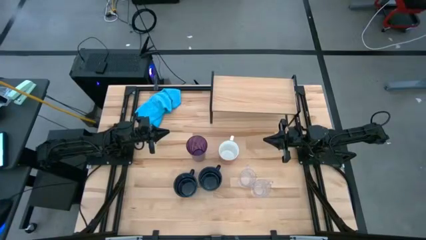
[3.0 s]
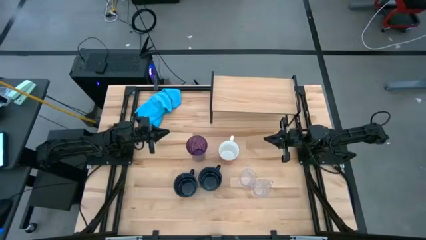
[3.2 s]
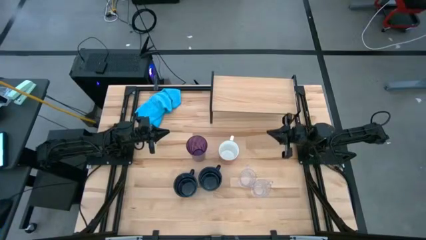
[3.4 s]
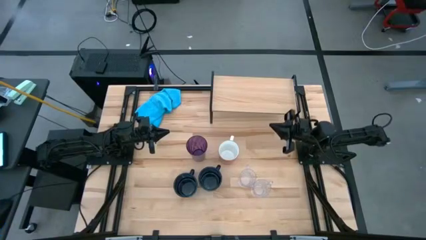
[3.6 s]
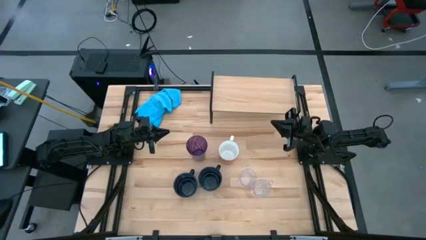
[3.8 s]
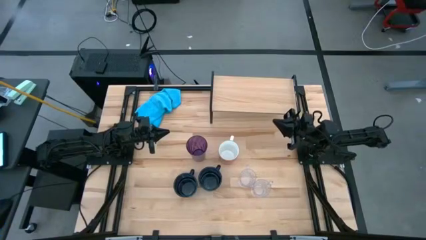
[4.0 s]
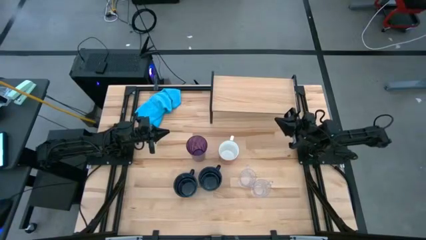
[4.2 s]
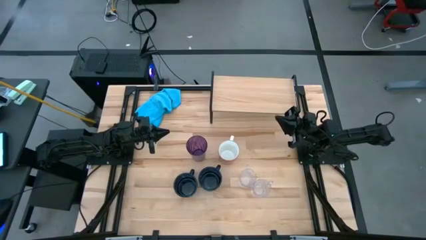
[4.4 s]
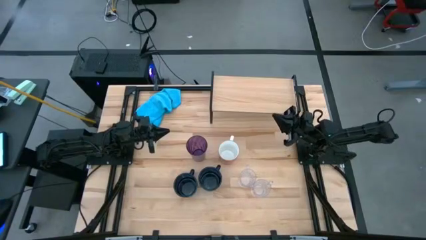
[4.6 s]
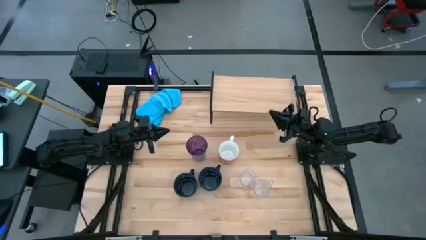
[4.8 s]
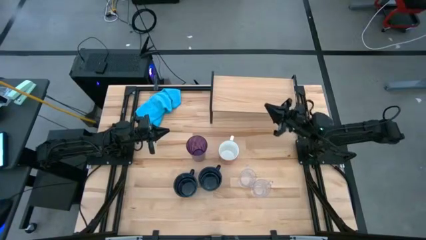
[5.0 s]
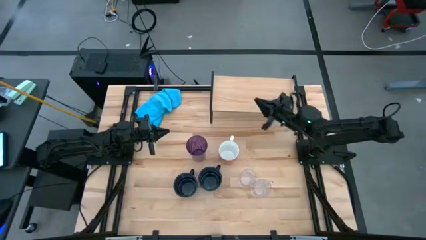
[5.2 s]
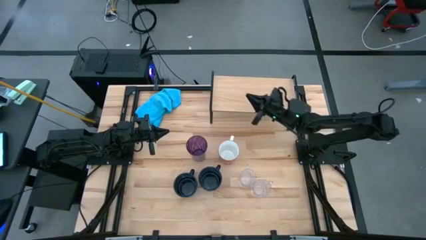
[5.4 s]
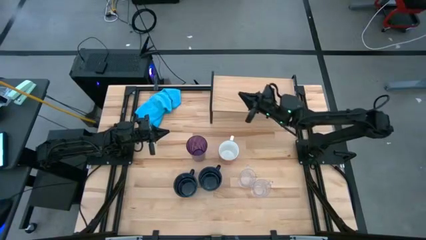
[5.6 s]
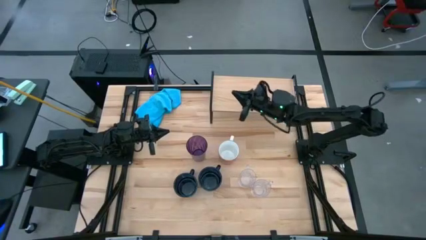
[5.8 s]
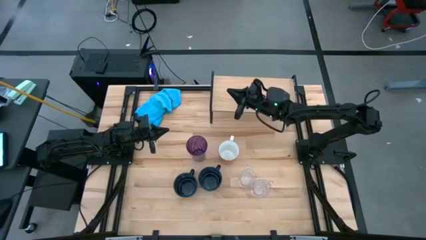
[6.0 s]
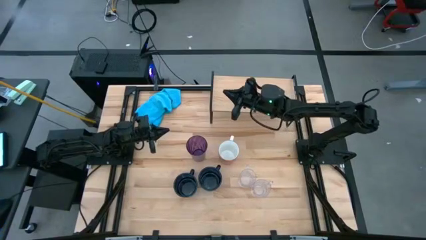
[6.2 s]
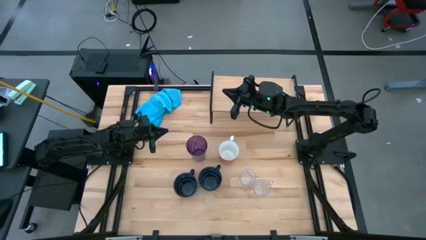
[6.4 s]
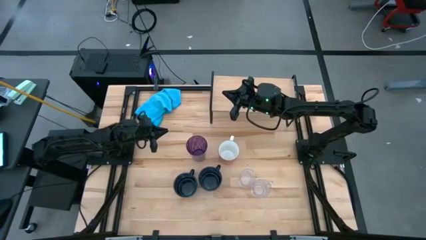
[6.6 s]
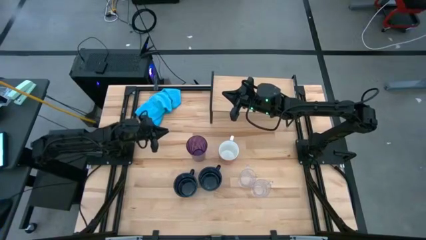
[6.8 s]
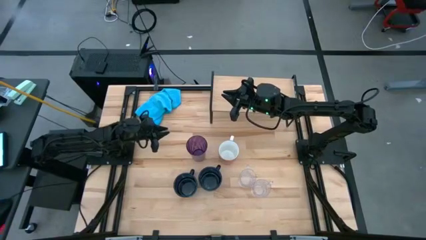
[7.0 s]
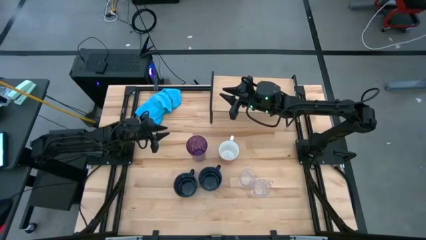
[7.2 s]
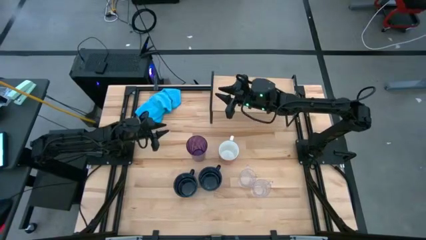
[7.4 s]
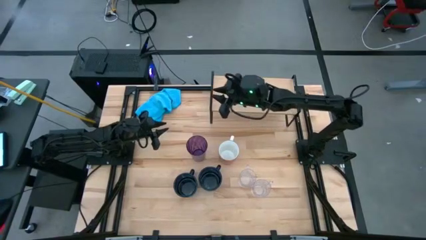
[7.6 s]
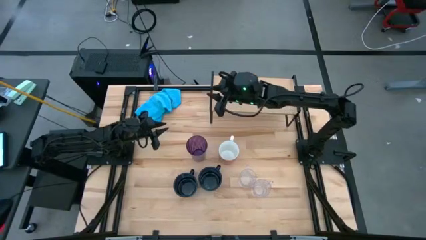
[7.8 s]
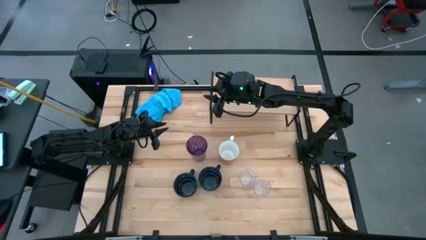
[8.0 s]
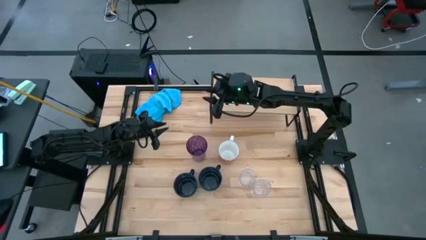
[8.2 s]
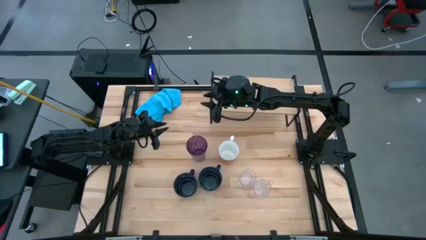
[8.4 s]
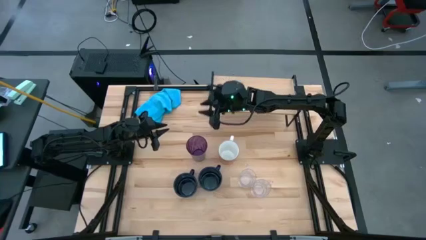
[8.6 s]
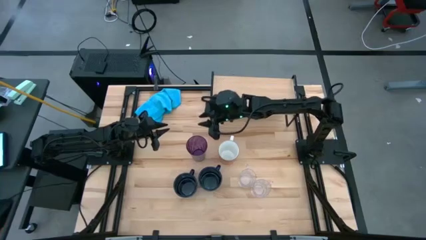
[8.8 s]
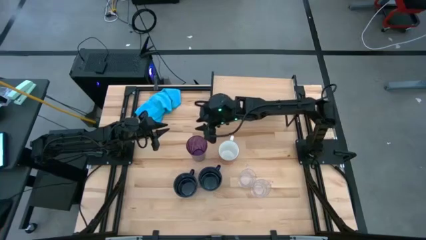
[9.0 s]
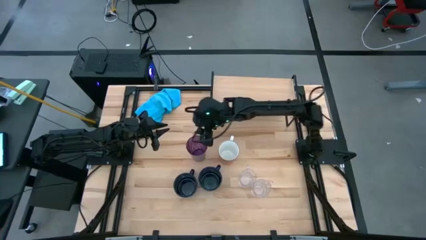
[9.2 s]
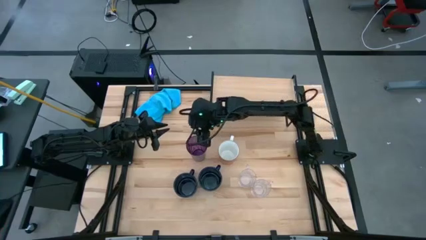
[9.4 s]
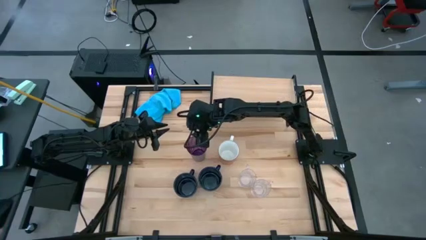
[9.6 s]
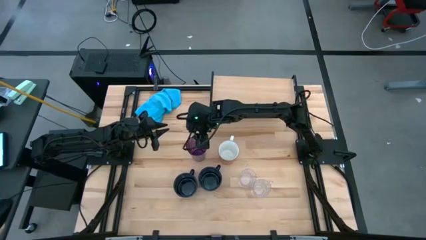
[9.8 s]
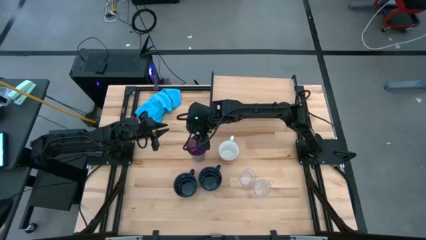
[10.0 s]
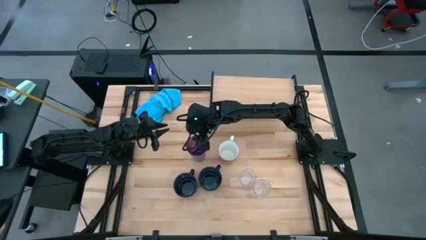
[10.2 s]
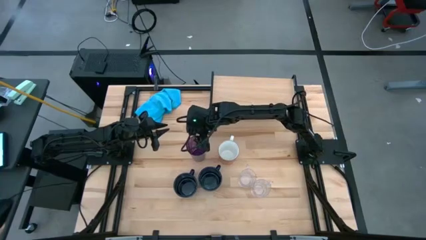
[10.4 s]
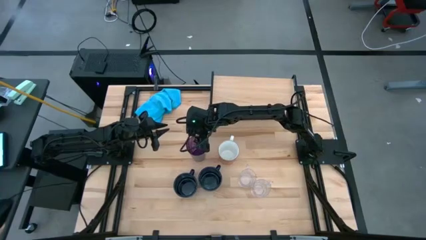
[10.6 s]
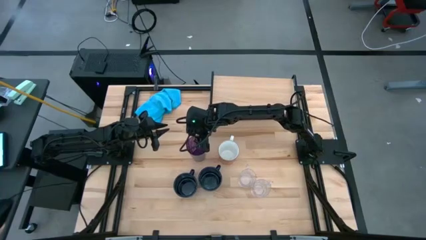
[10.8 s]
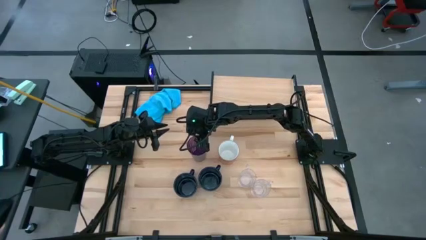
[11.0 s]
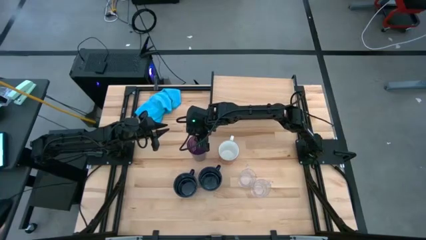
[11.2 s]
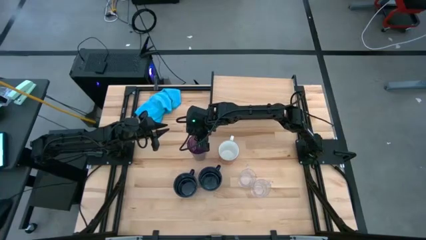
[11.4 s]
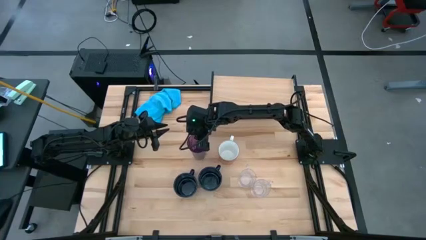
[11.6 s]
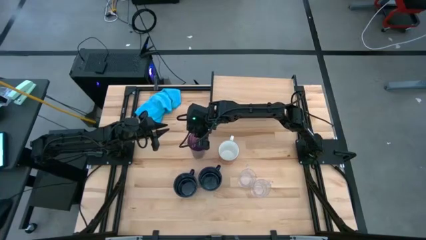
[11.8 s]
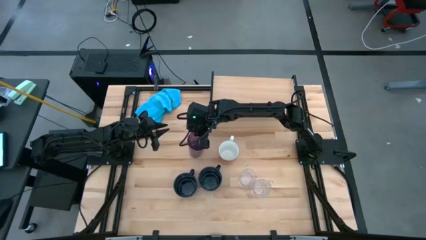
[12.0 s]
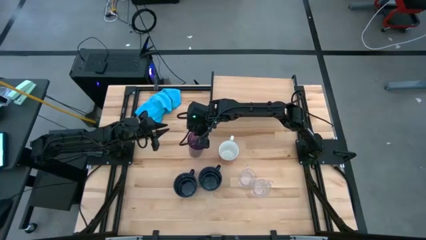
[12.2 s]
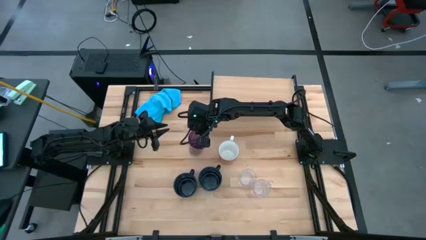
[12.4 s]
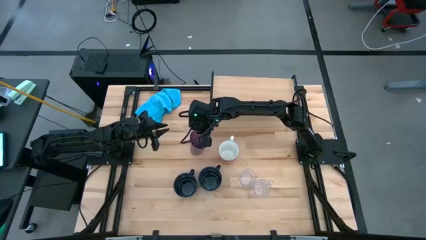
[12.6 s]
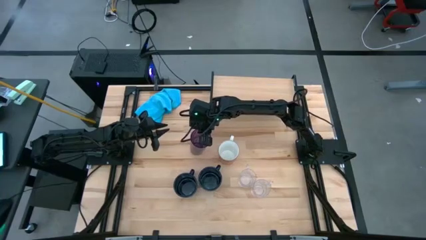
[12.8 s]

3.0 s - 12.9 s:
Task: Stack small to large cups/mugs on shelf
Put the violet cup on the shelf

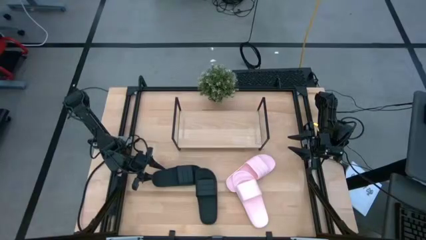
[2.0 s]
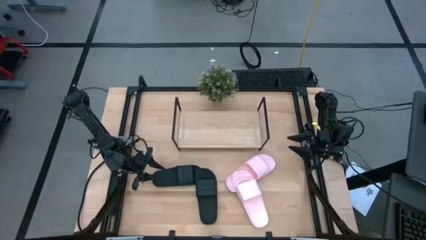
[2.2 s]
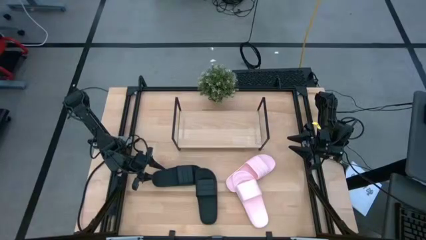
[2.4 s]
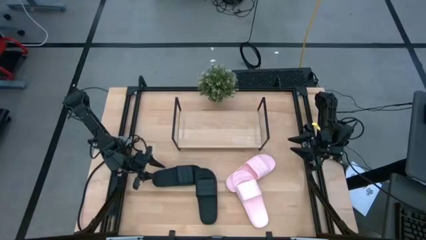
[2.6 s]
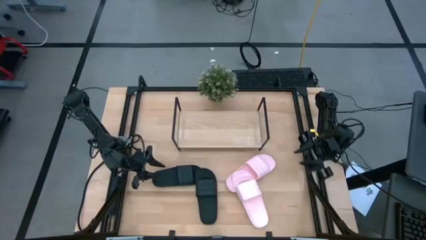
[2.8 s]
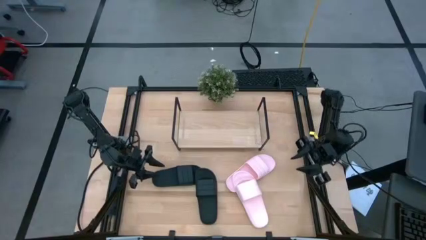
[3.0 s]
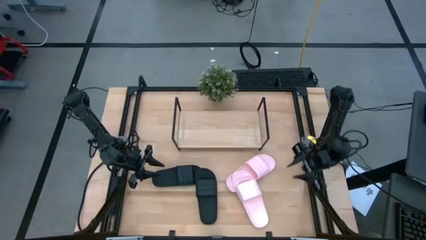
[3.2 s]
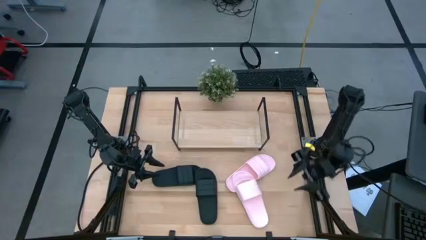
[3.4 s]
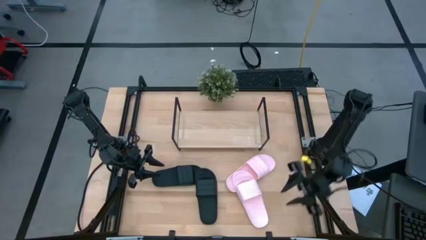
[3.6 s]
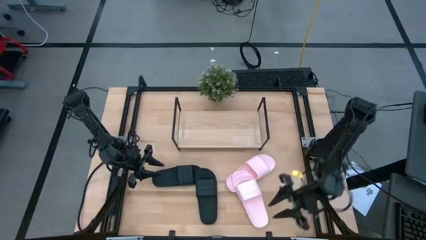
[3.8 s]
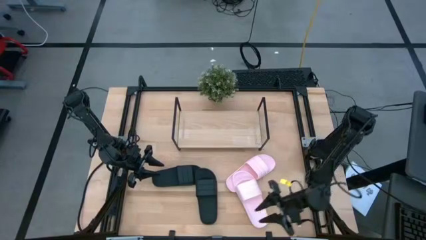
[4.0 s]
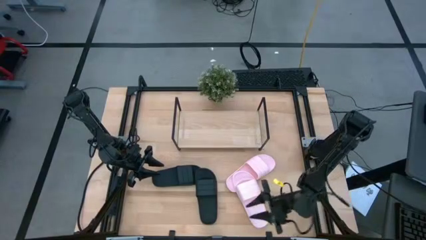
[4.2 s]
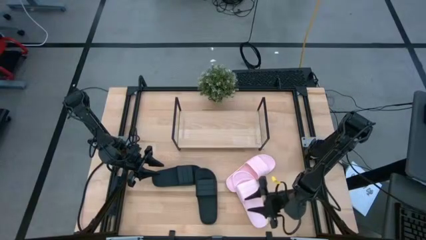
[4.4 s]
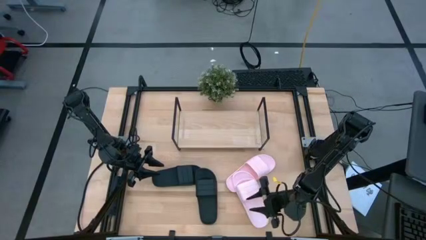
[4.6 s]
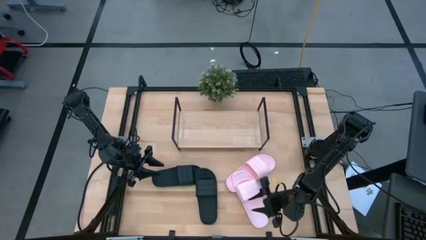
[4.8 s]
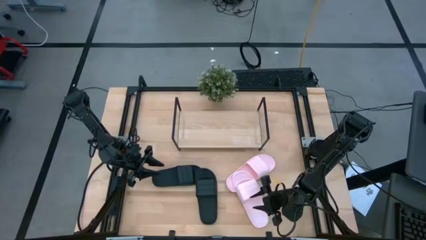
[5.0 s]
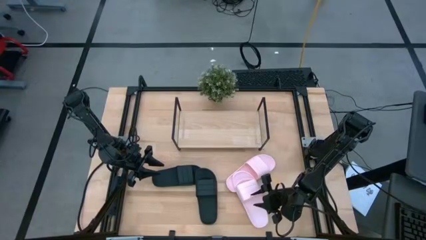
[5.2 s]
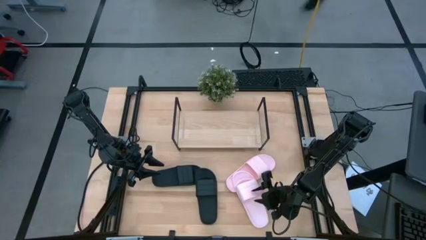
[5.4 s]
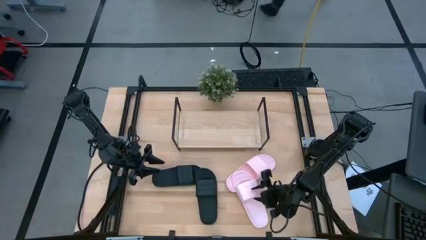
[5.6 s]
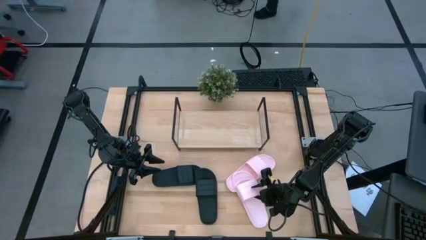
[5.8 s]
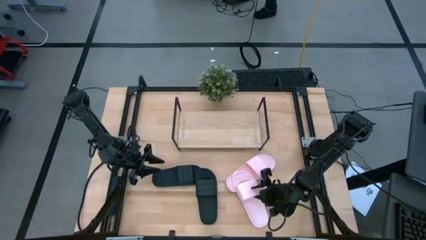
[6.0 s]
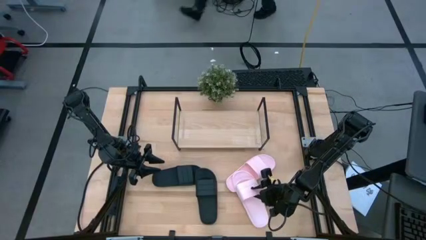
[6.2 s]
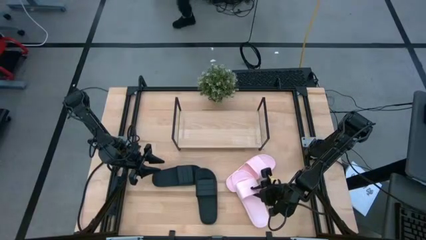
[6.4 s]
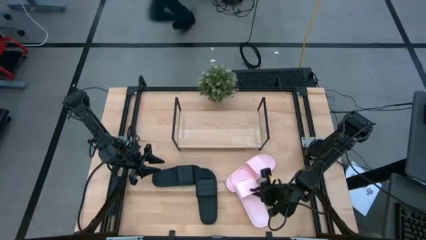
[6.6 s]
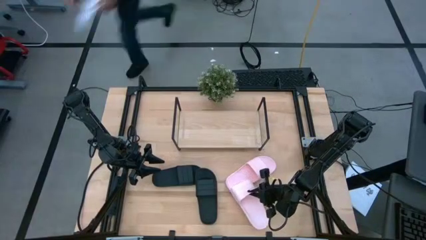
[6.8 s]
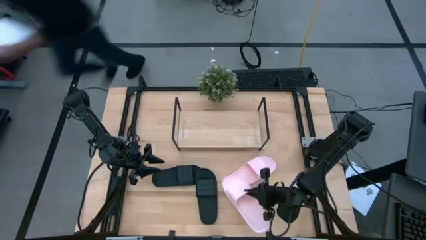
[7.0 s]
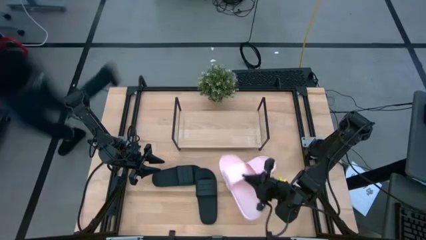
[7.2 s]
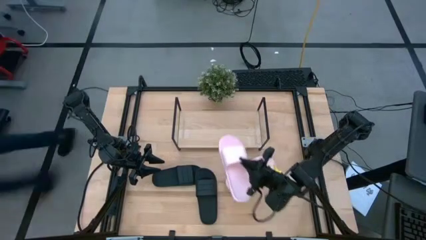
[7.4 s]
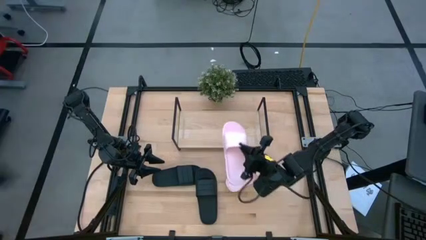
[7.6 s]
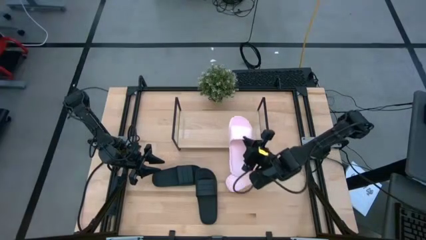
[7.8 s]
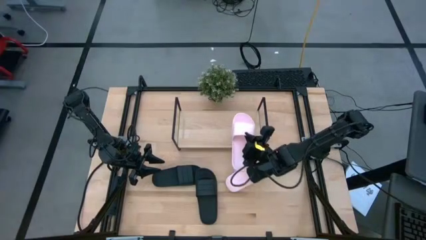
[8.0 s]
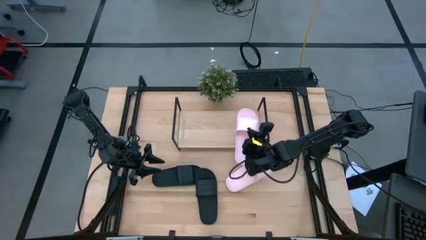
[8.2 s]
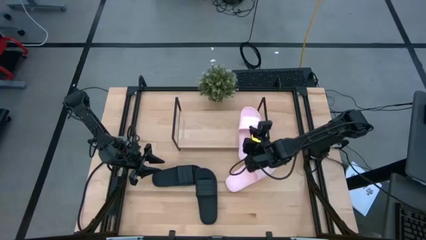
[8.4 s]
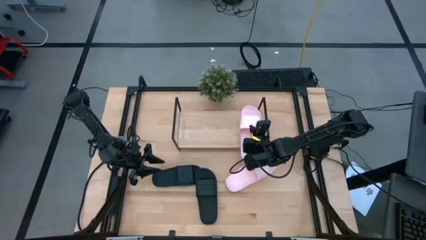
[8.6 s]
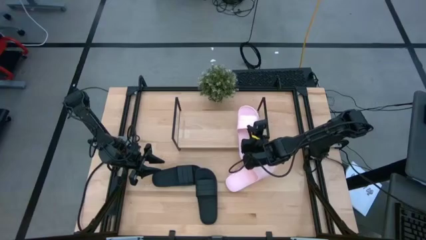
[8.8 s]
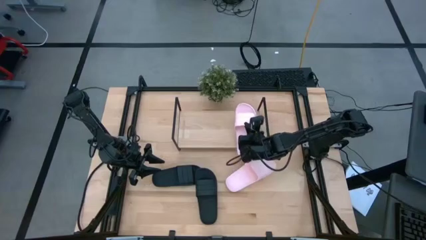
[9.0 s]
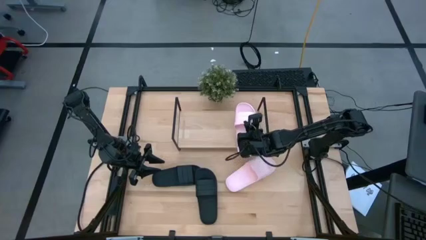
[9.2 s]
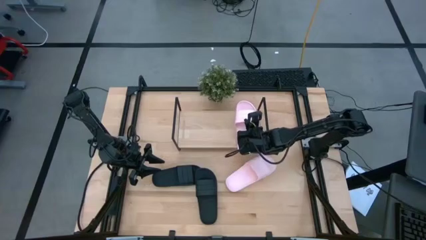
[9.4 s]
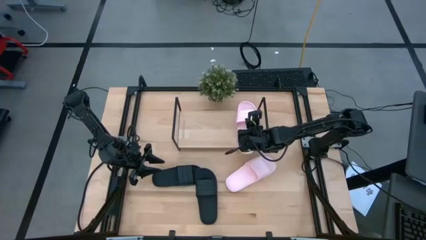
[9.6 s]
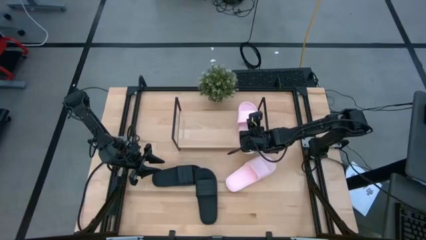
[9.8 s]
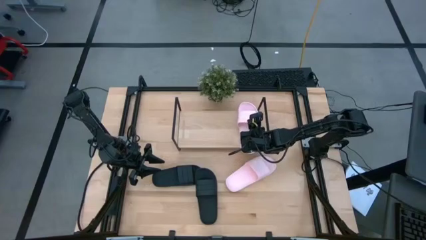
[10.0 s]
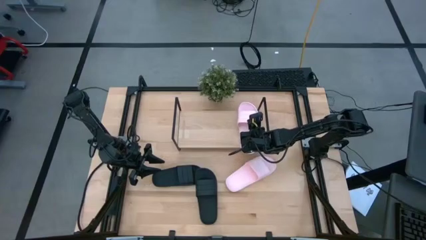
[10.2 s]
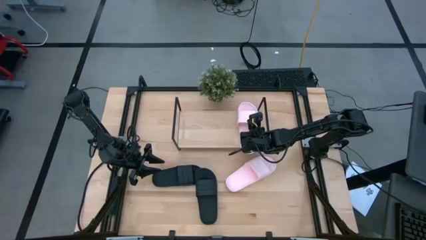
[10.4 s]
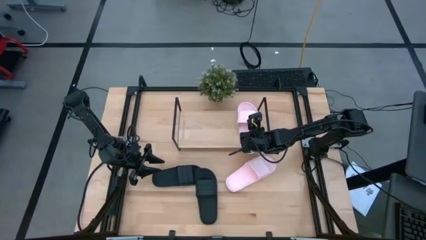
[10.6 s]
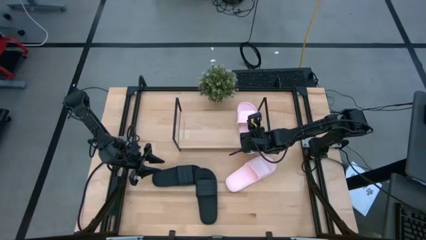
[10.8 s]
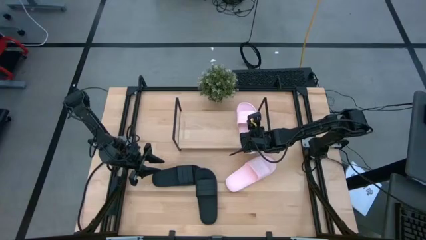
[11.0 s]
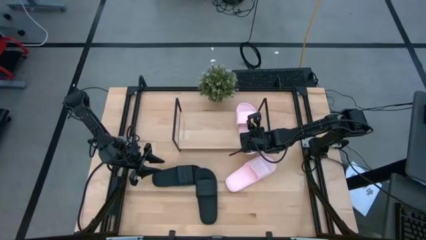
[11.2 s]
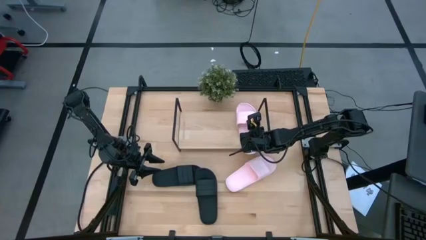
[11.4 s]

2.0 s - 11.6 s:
Task: Pick and place slides into the shelf
Put the bottom pink slides on the shelf
